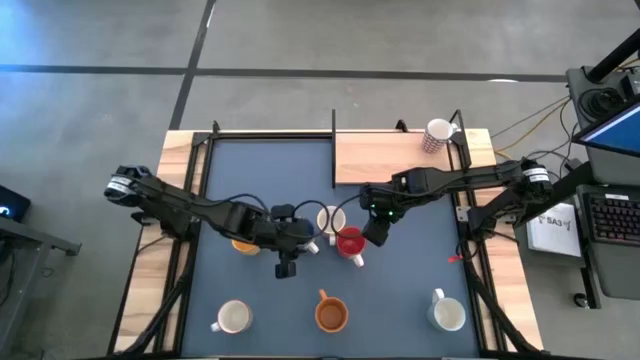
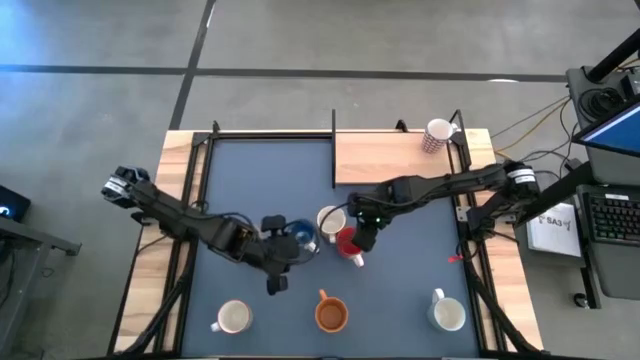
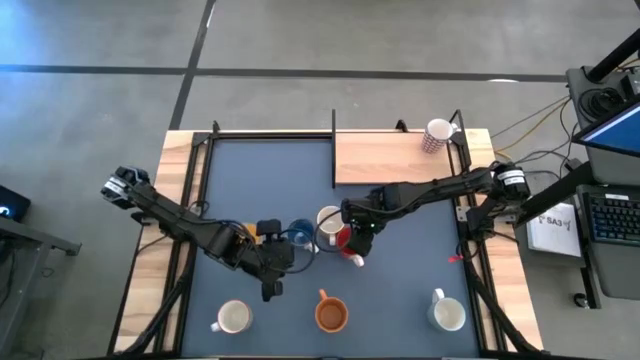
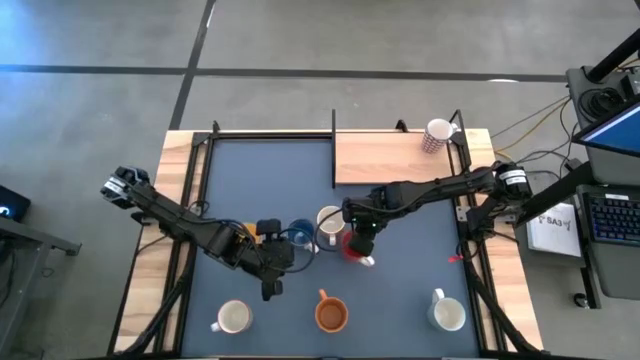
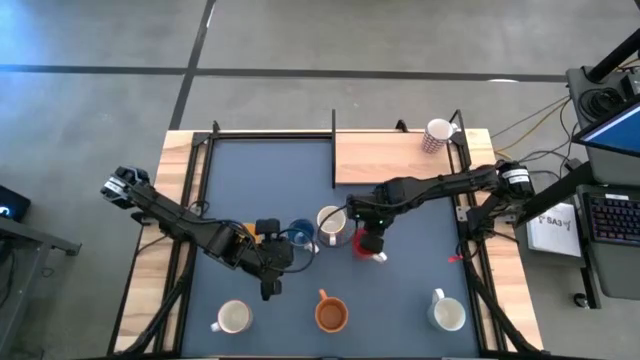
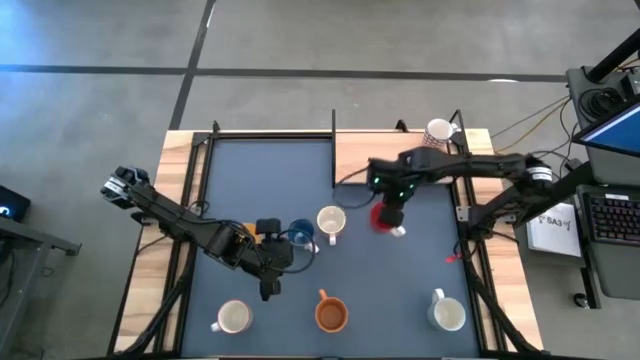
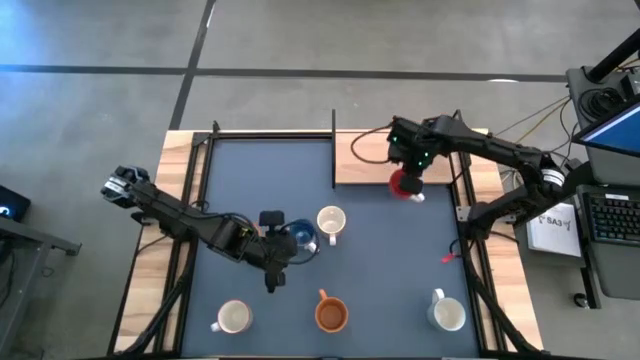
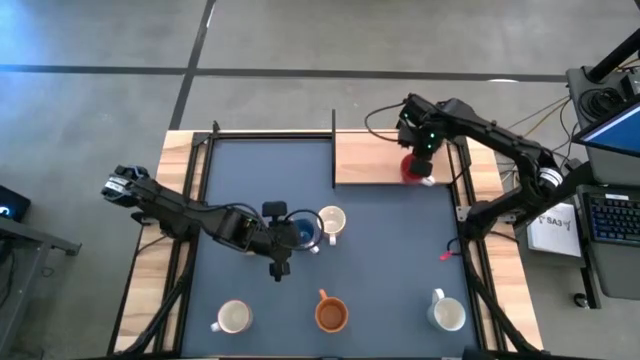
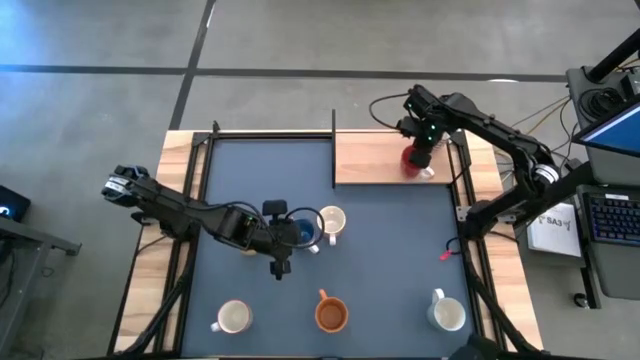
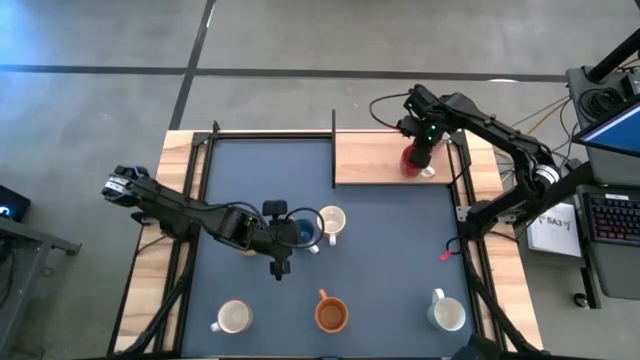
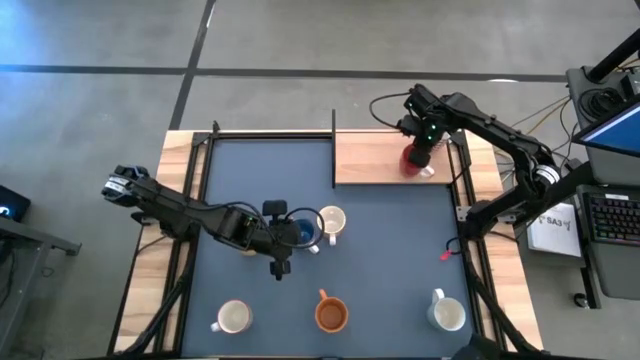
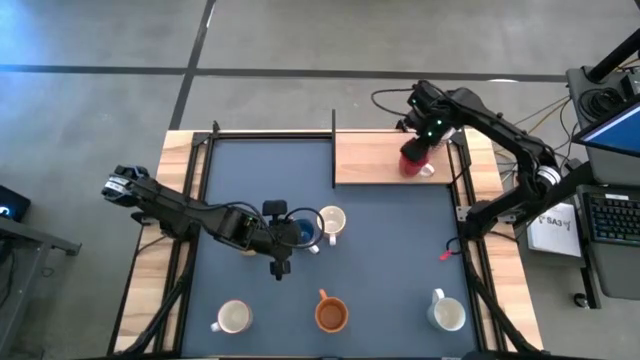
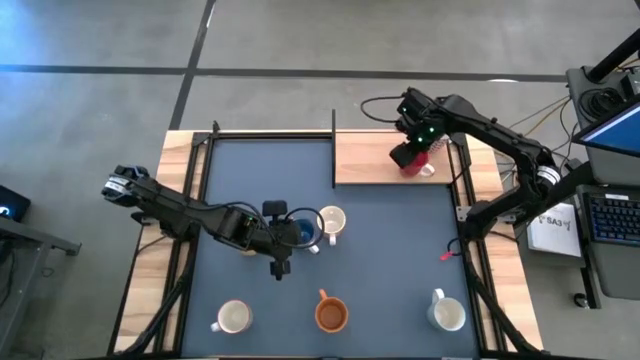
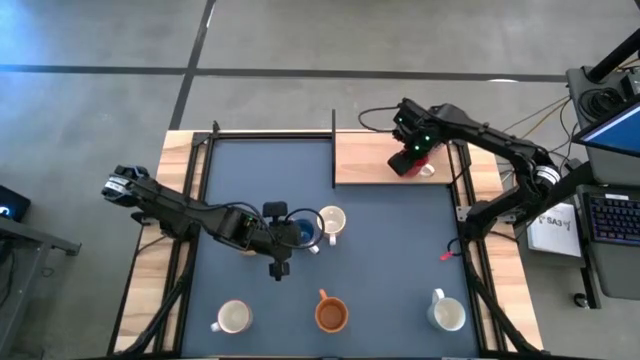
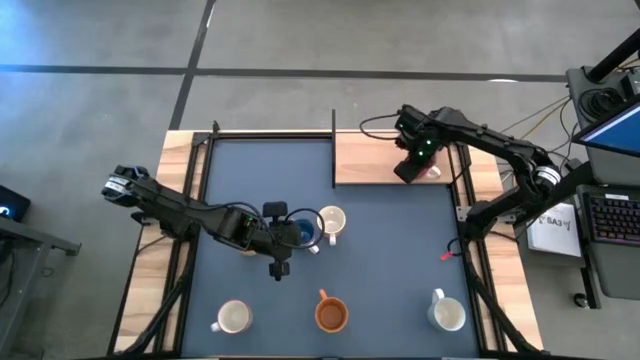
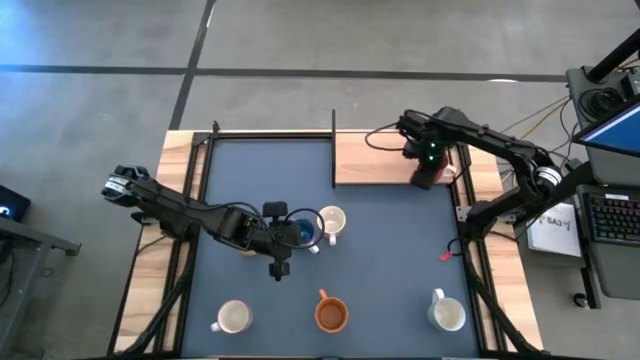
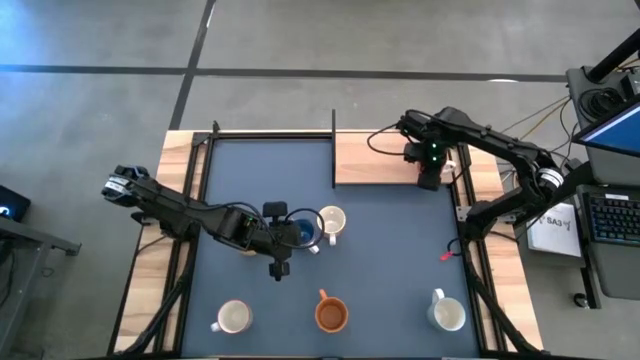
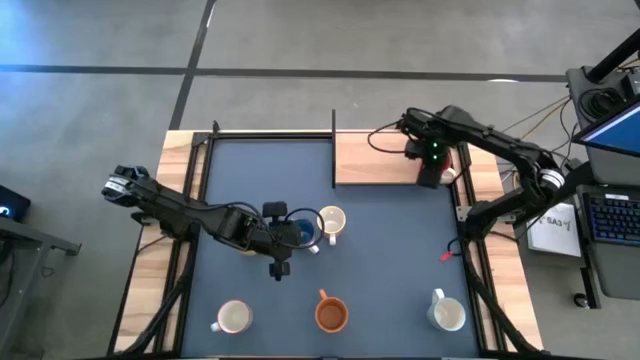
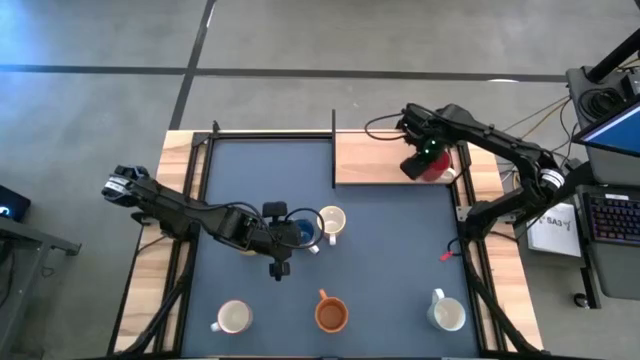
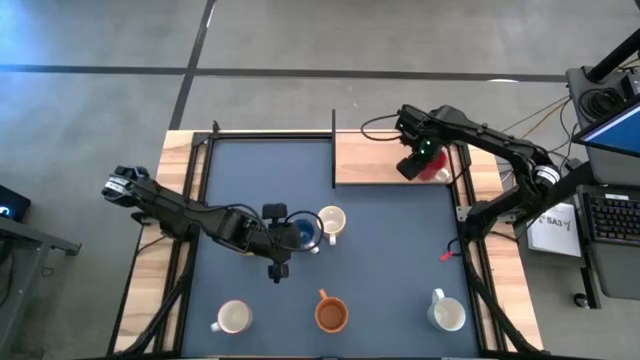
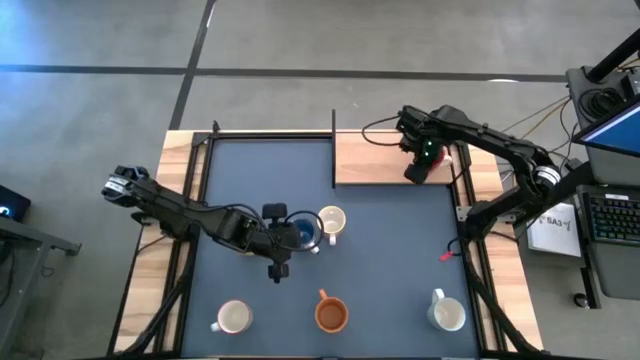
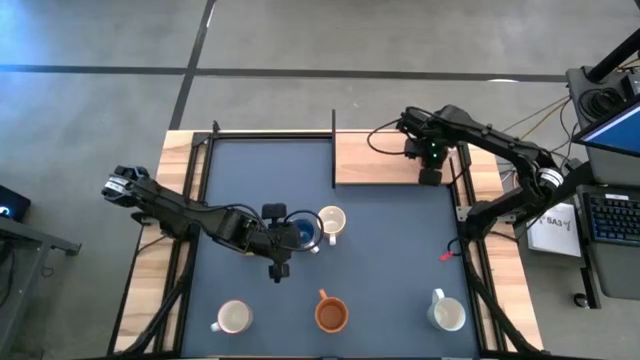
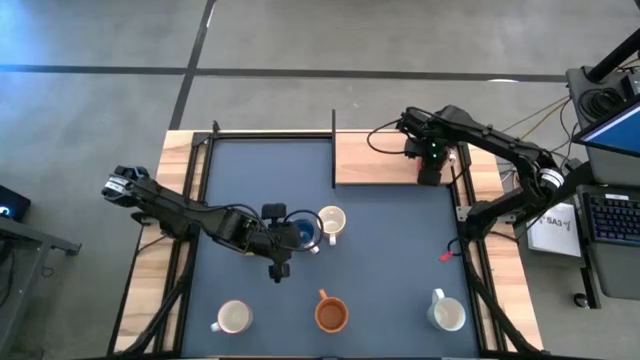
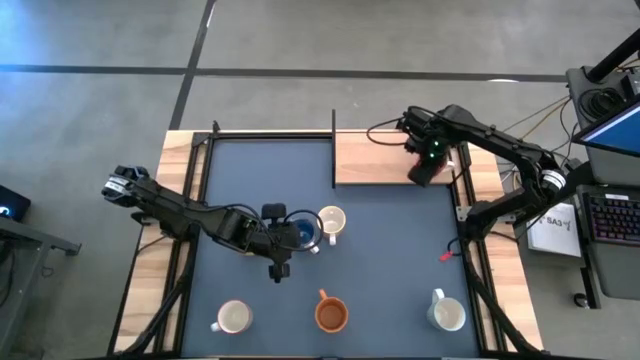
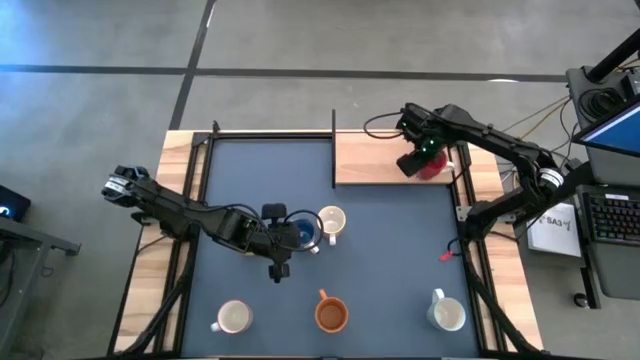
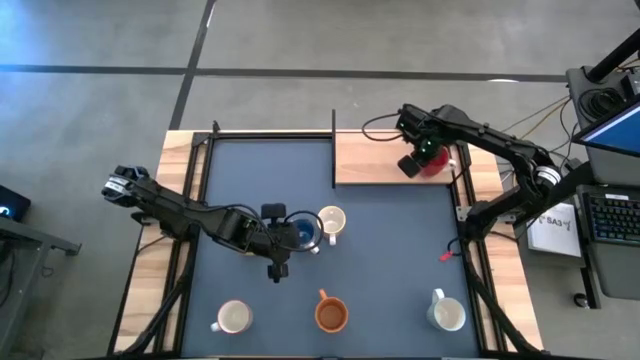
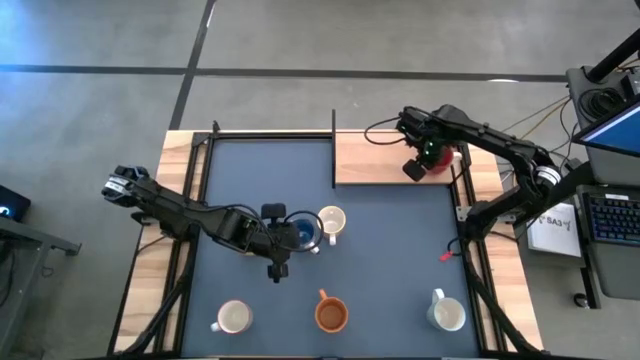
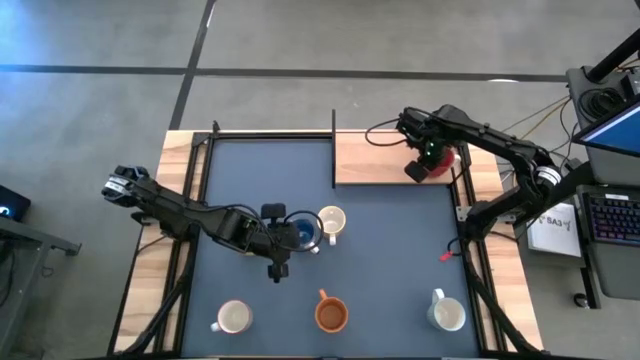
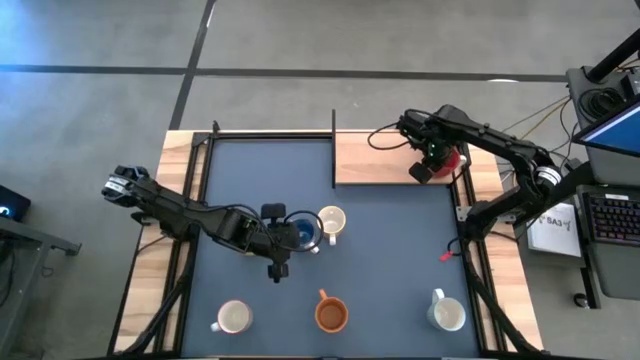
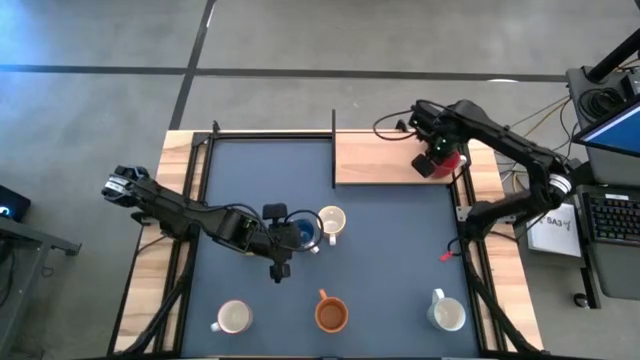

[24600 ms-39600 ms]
Task: Place coffee mugs
Put the red mug on the shelf

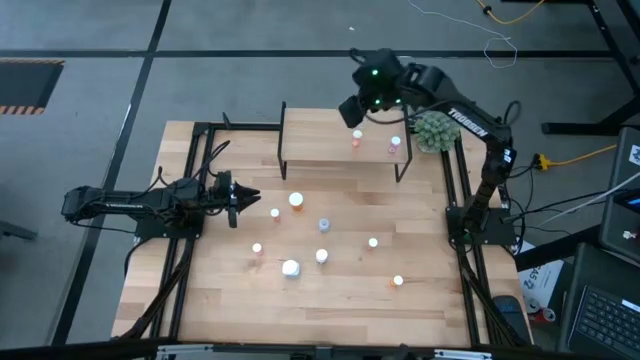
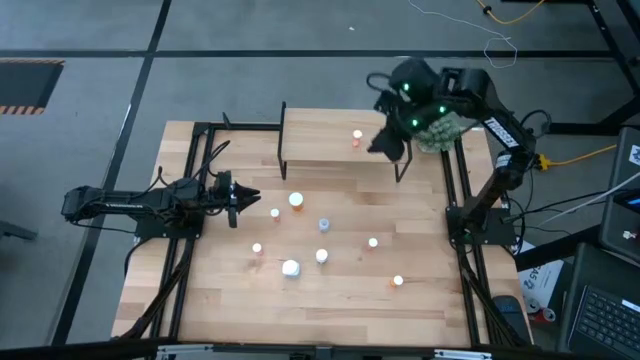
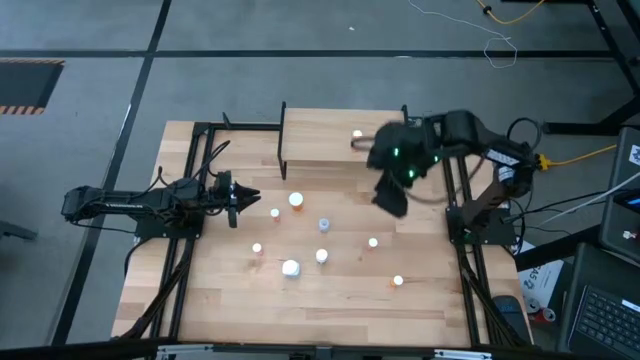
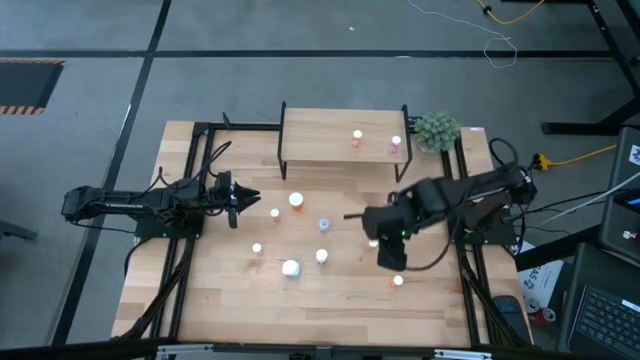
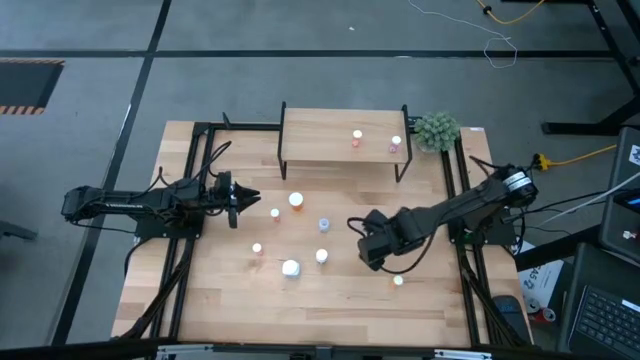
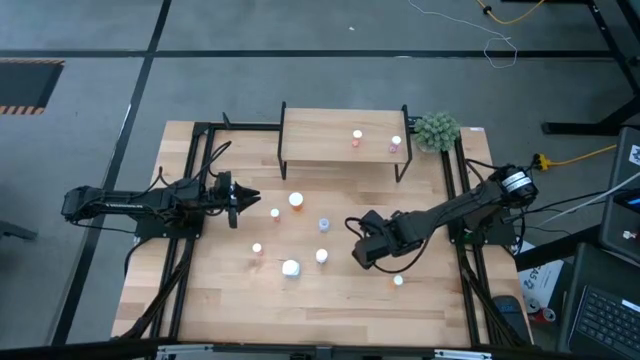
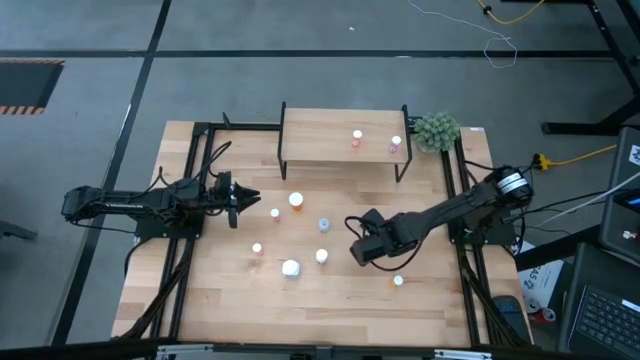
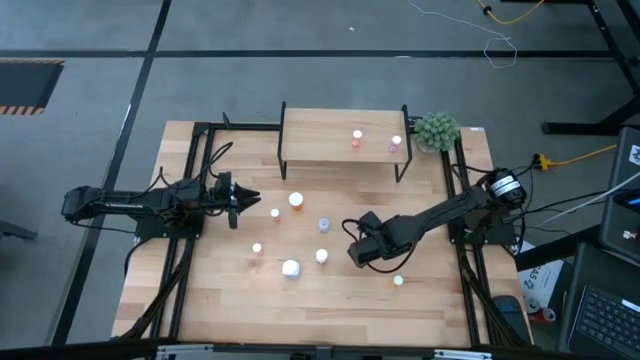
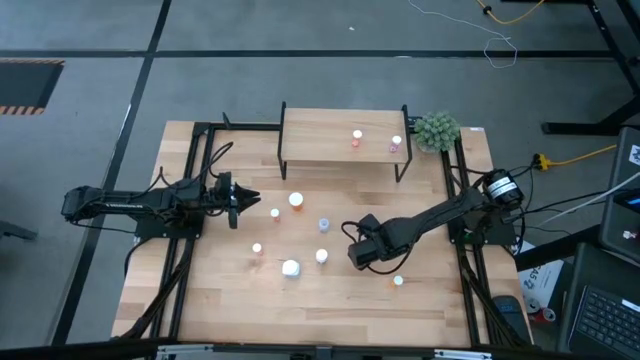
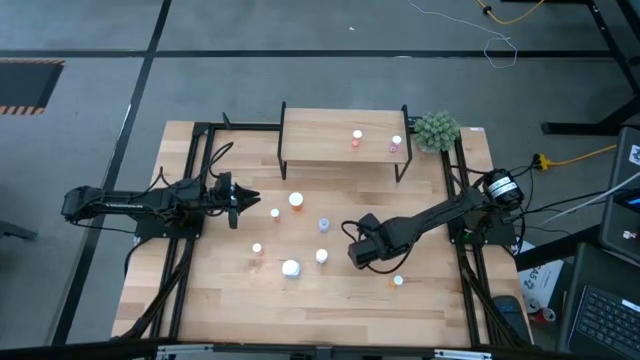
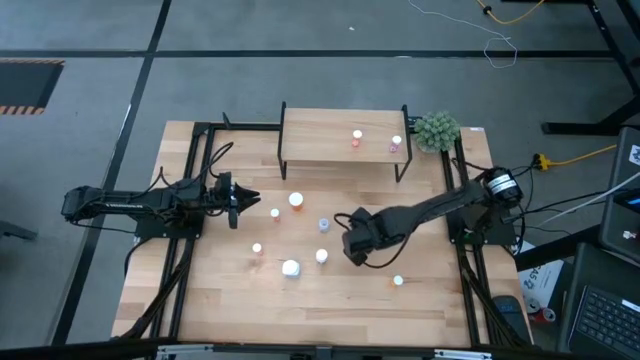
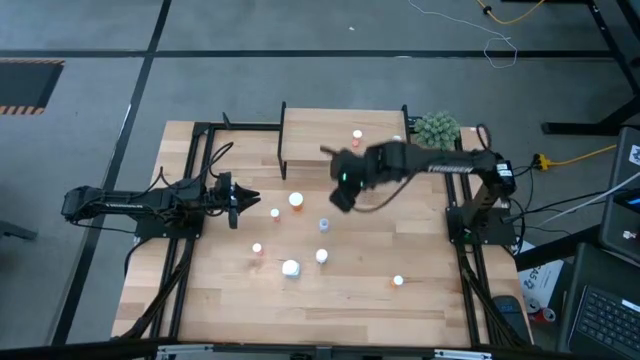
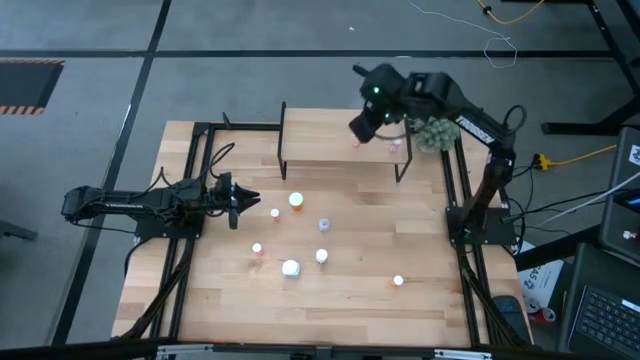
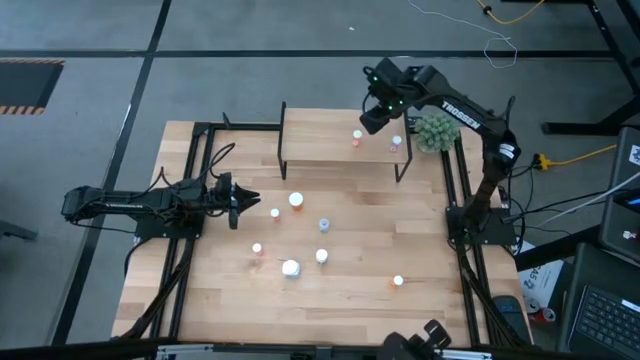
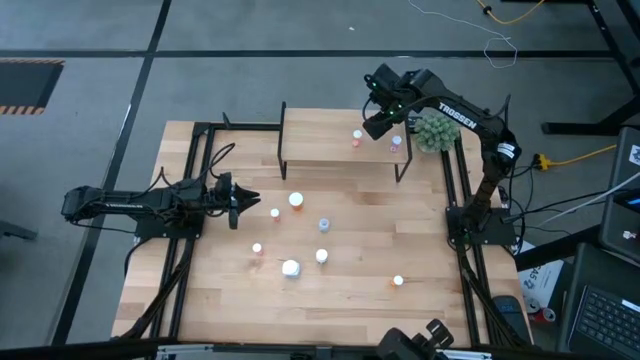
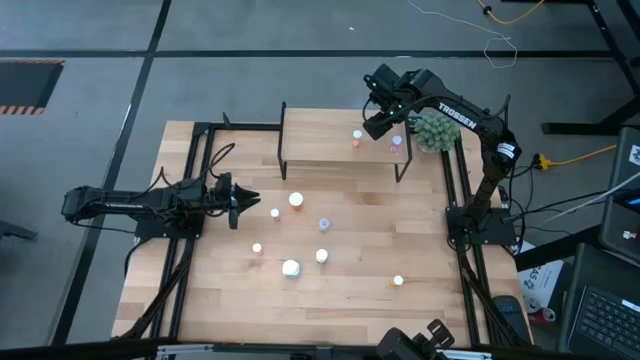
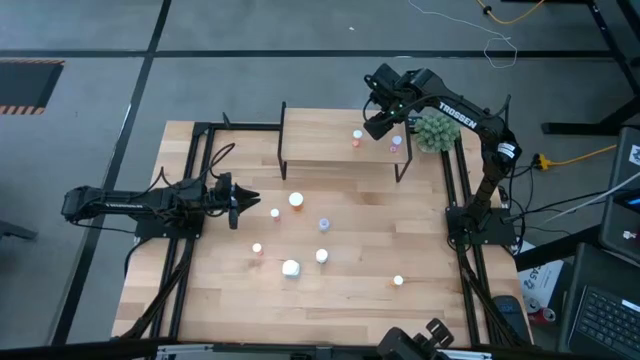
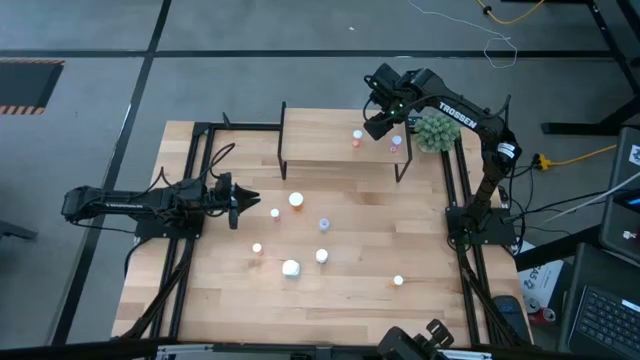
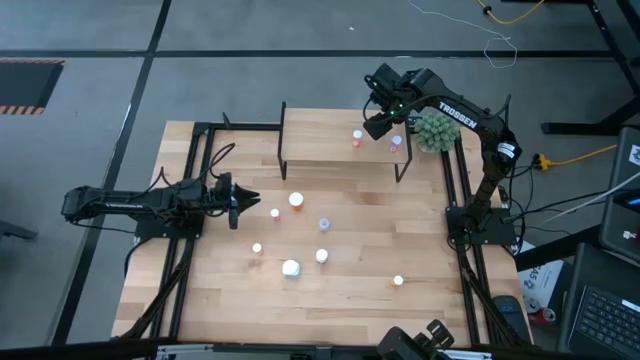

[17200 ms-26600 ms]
Task: Pick and place medicine bottles onto shelf by color
Put the orange pill bottle on the shelf
